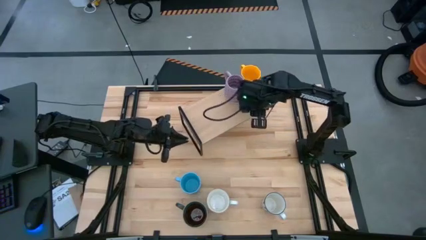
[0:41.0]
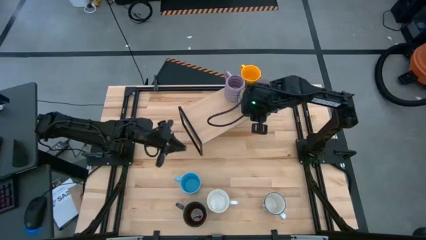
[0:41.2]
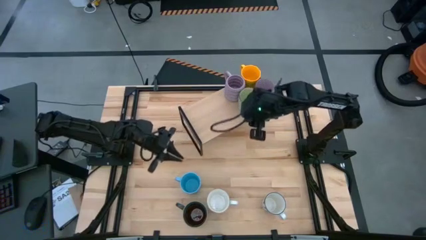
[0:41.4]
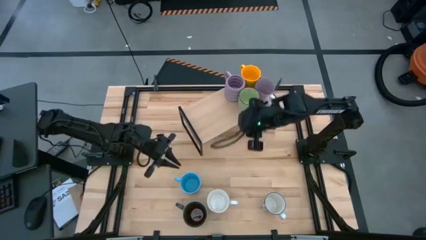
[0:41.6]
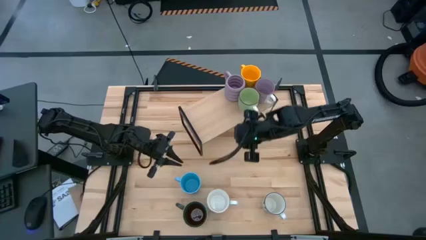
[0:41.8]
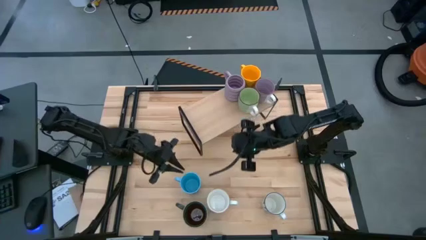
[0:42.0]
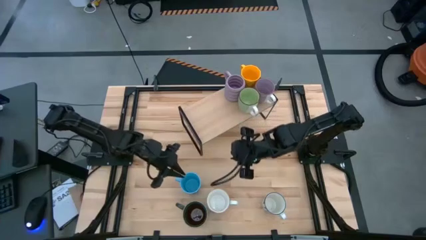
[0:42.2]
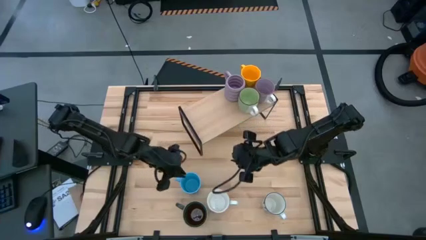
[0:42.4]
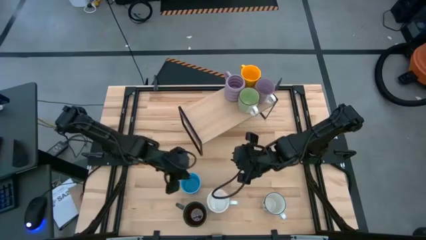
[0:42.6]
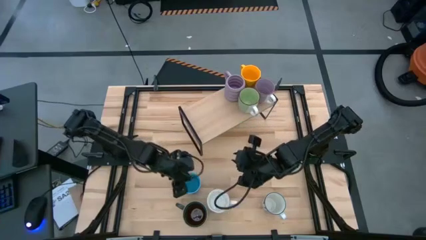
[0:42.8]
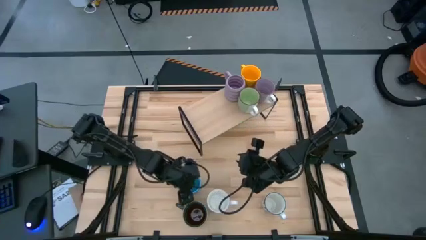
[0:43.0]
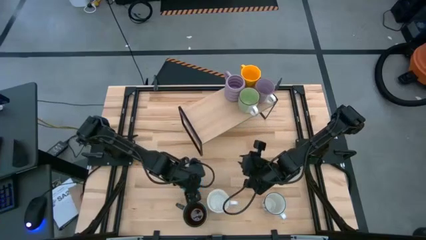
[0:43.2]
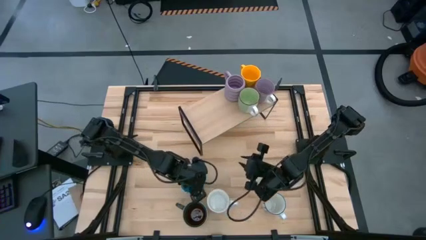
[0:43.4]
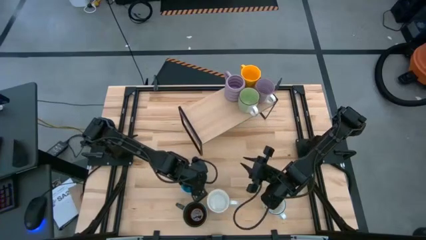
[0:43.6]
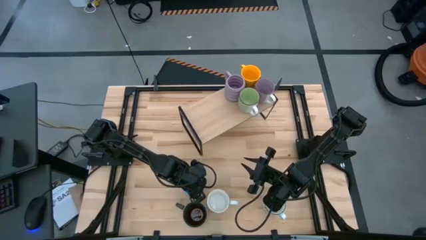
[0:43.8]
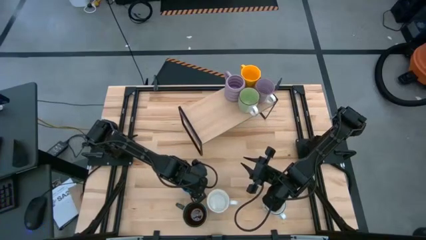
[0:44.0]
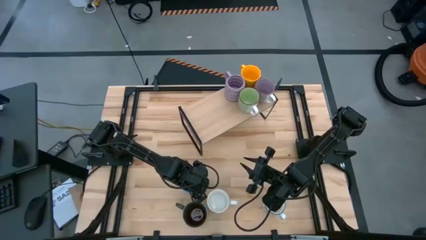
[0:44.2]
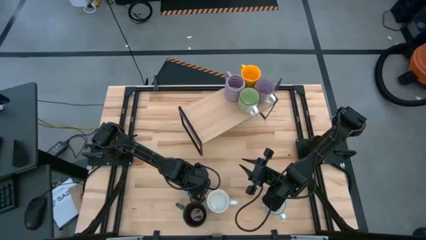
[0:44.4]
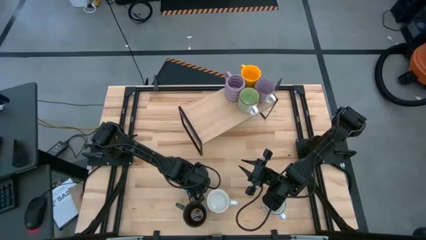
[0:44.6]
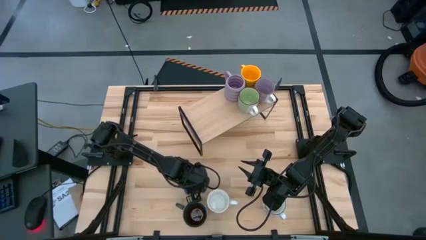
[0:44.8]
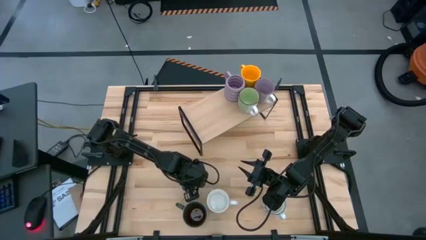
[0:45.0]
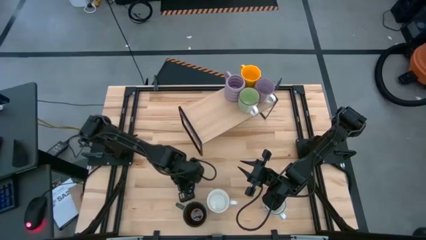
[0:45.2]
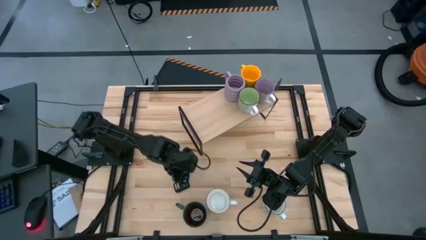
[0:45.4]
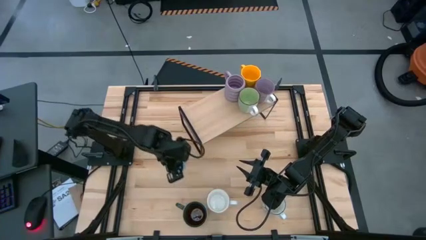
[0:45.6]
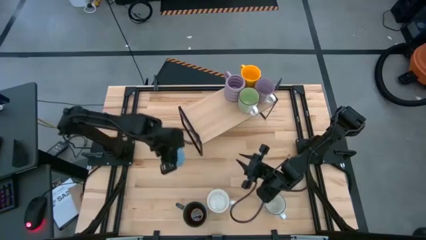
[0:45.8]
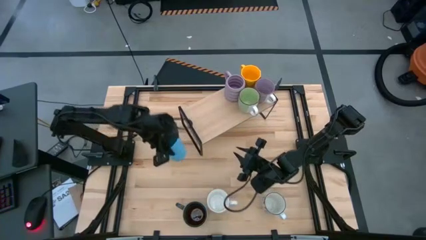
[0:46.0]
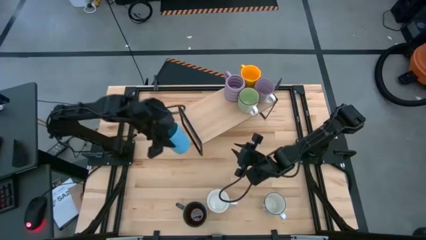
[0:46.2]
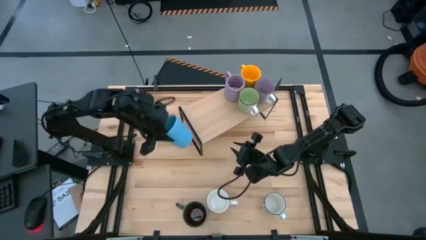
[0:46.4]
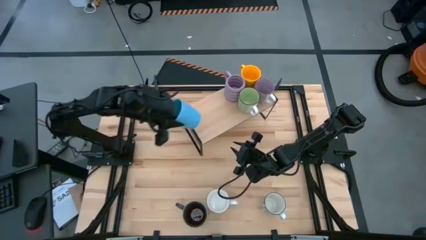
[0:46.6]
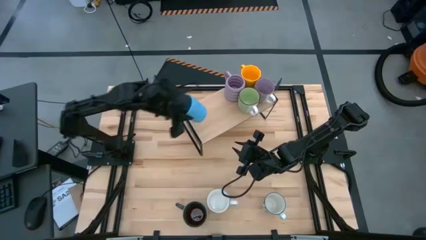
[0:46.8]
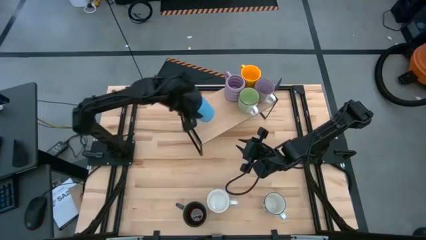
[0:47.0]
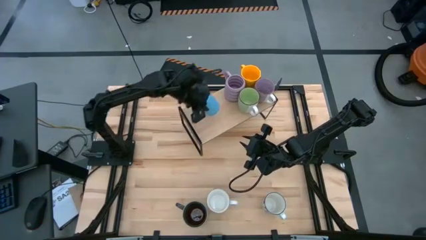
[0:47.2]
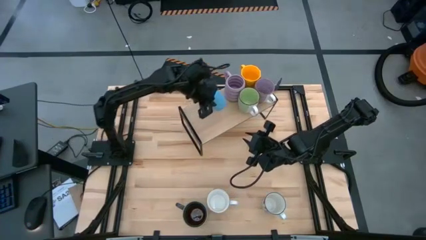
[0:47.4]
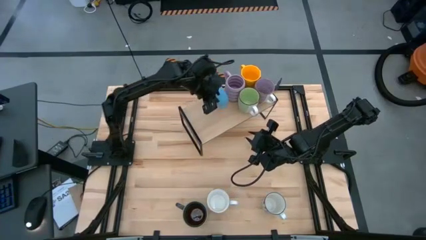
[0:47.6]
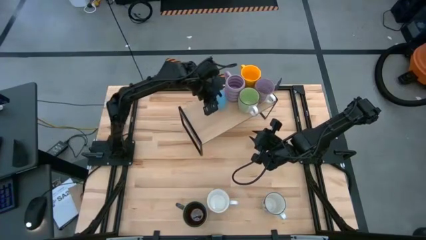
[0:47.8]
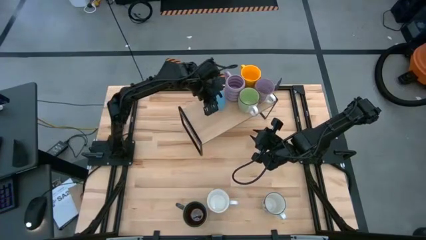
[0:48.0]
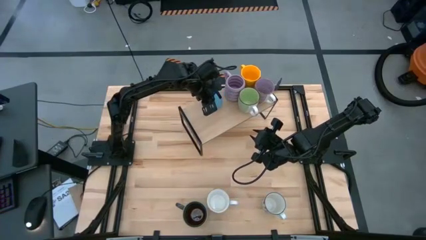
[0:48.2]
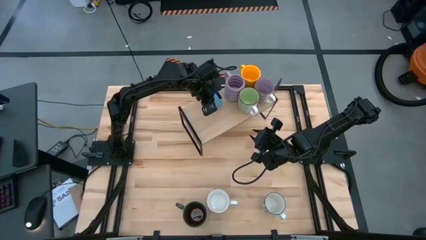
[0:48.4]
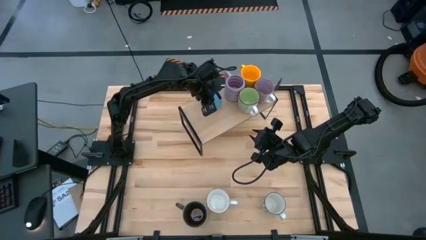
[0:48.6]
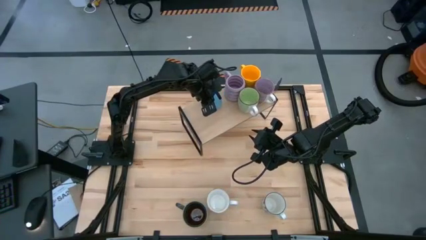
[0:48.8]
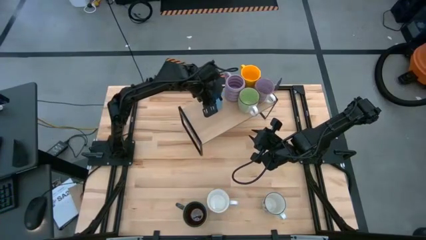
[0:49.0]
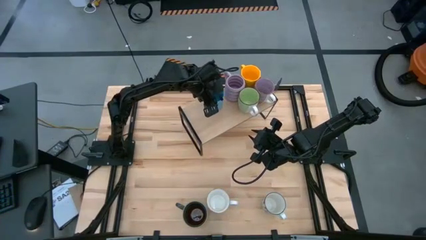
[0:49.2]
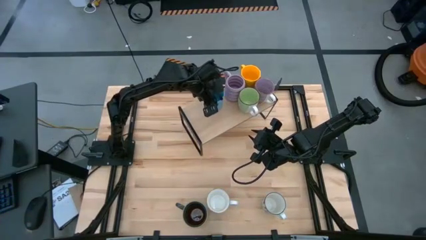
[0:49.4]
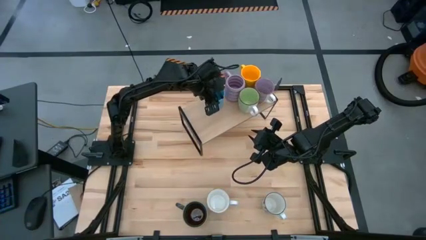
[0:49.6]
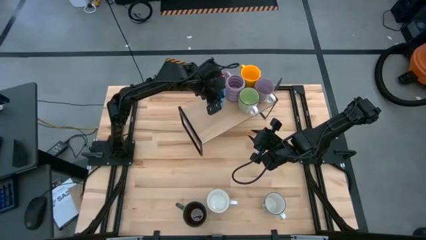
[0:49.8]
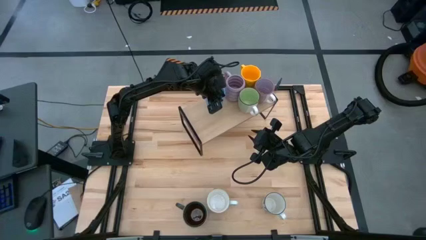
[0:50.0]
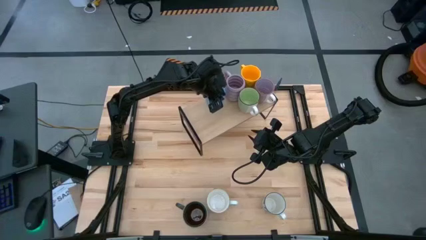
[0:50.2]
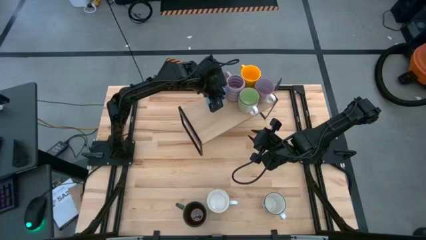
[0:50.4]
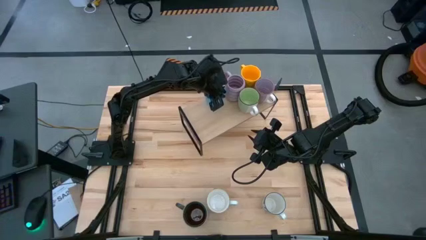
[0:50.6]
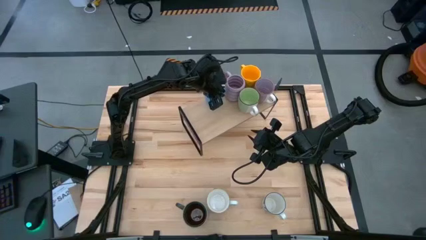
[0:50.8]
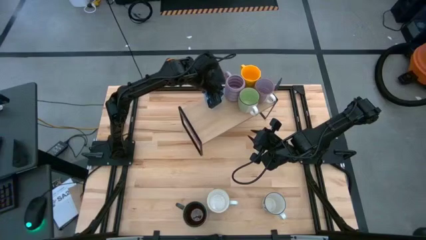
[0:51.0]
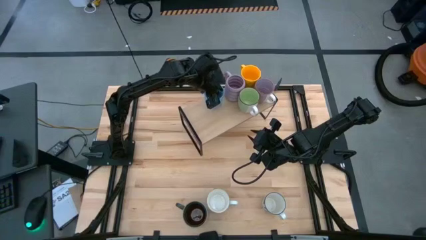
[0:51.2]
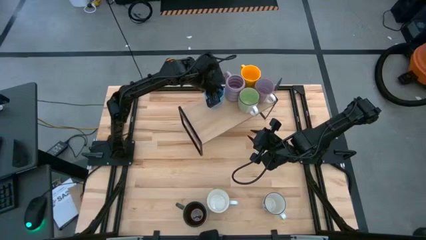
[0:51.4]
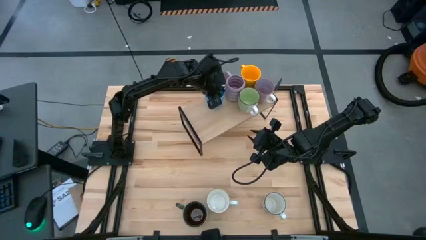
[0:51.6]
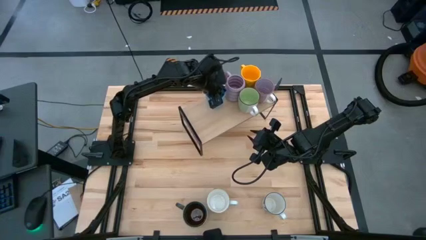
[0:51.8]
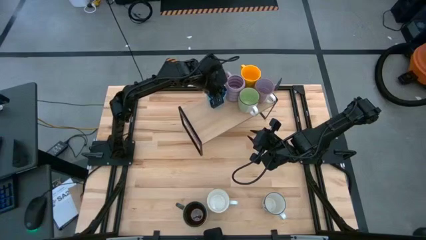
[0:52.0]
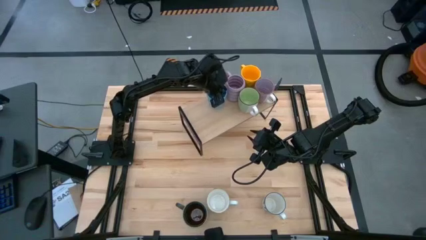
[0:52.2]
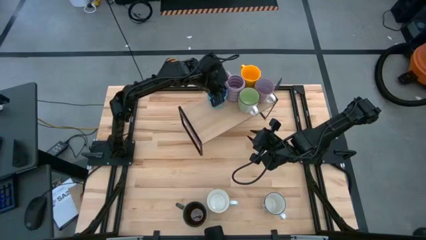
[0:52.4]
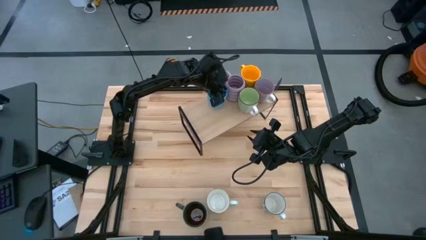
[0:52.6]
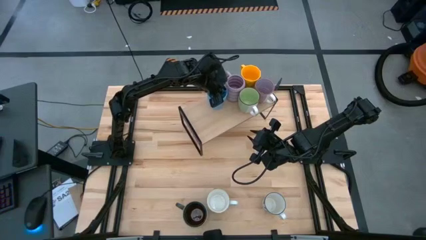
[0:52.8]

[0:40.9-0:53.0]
Task: Place coffee mugs
Put the blue mug on the shelf

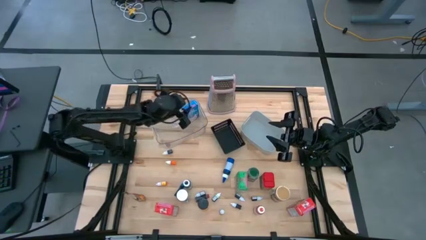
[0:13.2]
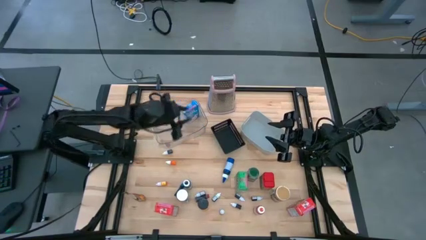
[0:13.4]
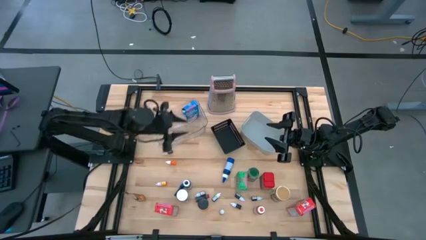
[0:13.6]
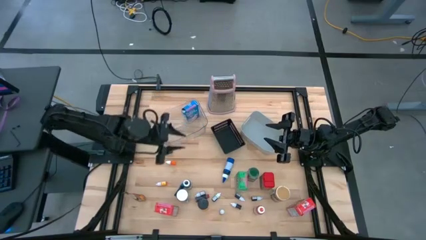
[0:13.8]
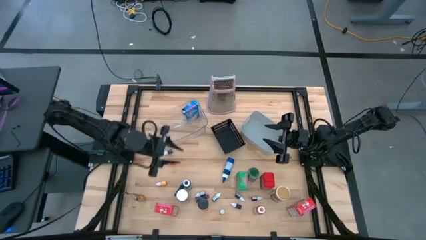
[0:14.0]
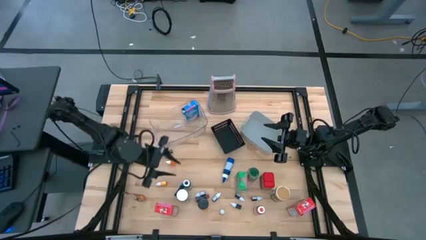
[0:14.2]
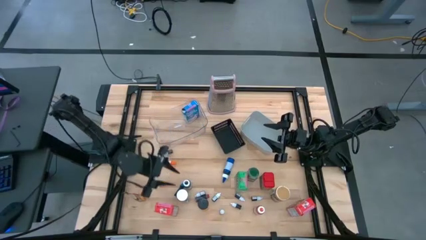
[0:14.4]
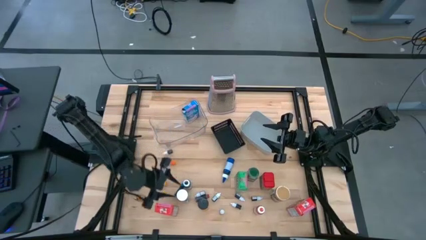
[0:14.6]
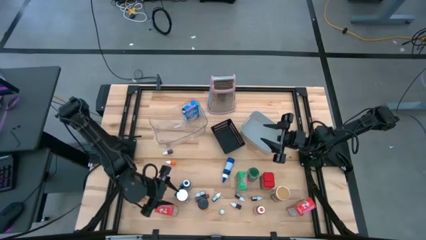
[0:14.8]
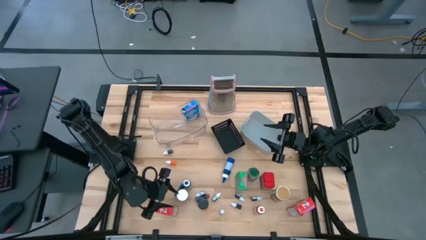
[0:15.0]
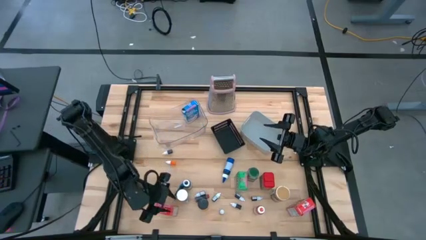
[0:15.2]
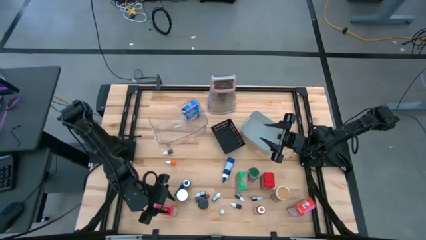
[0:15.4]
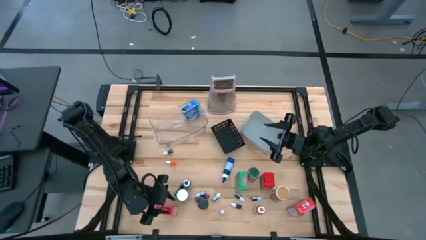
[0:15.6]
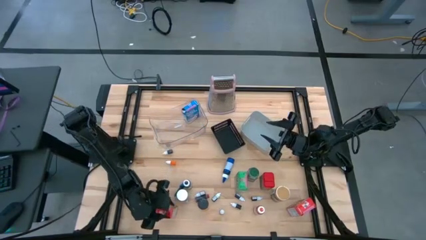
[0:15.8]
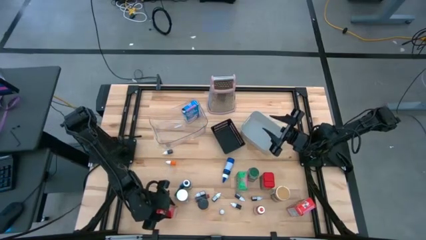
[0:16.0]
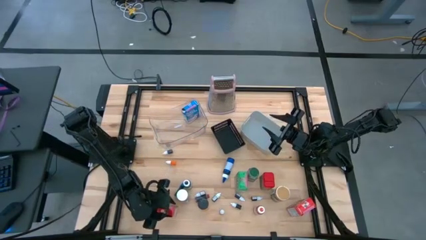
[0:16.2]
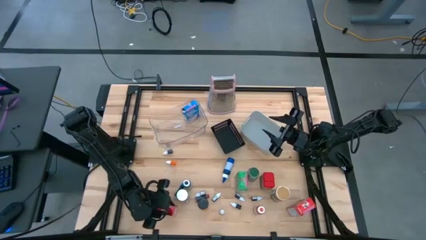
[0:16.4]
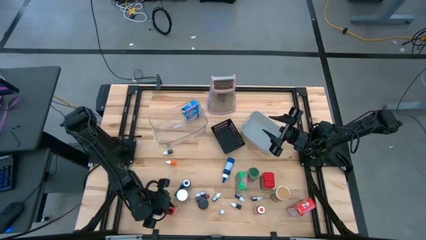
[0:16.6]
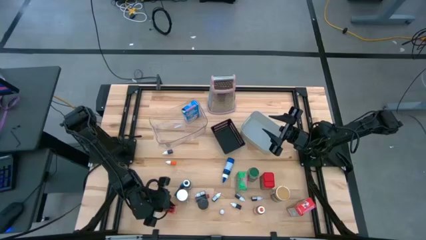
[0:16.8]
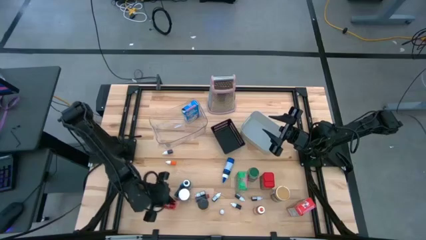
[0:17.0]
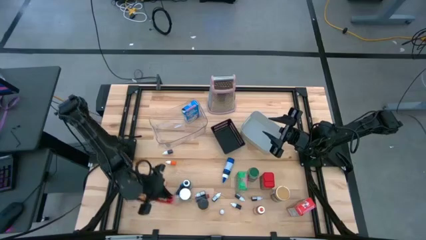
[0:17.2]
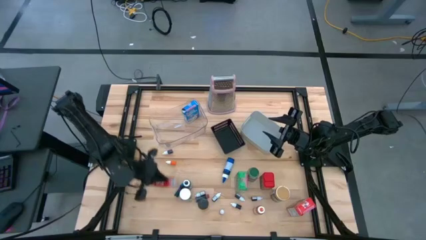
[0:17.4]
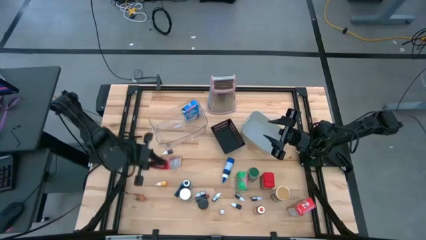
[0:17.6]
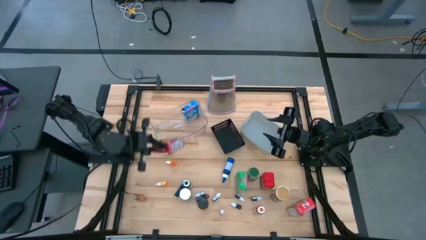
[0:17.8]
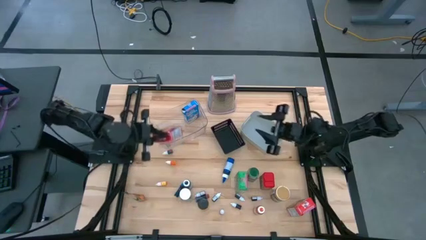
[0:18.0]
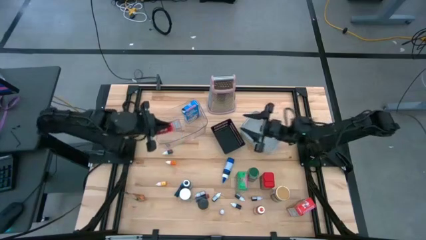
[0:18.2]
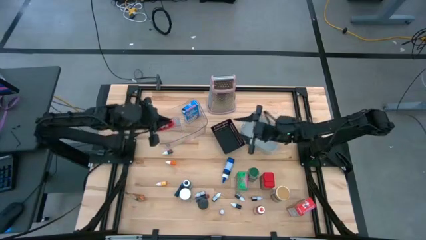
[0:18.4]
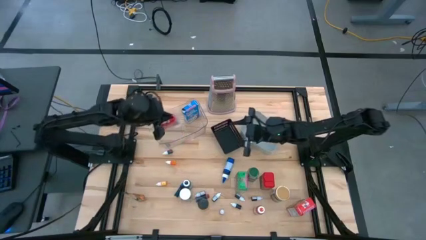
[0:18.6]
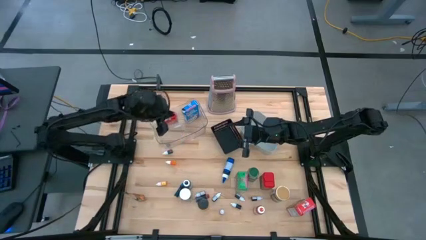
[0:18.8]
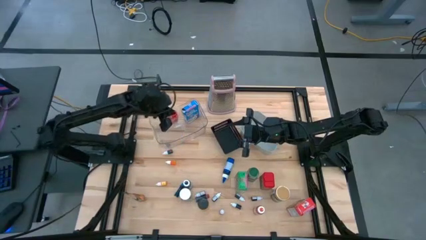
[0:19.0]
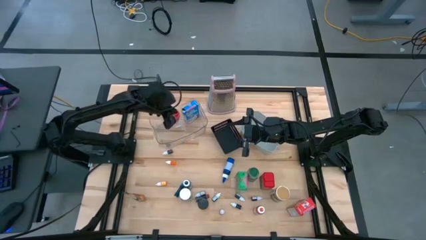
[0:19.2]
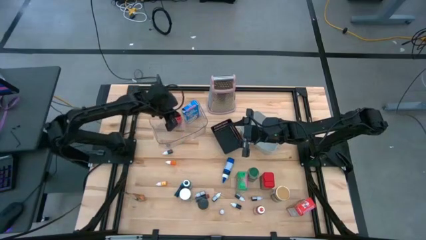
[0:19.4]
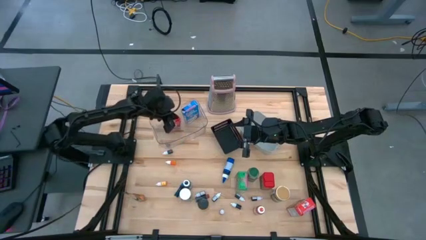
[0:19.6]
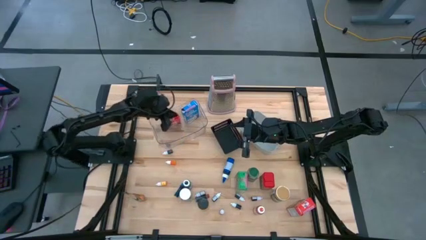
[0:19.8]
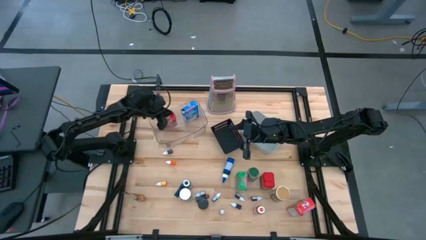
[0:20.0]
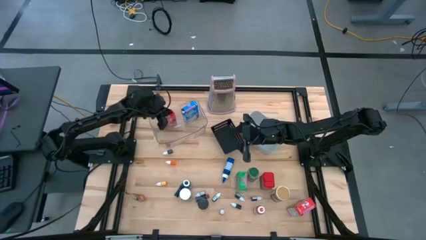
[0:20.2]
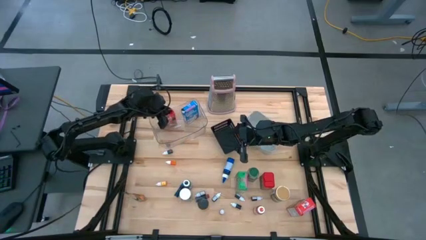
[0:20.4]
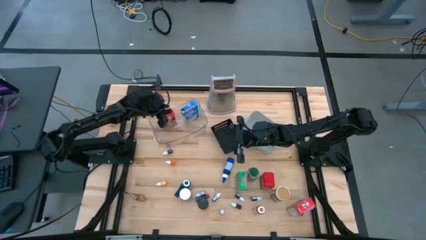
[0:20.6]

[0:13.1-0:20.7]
Task: Pick & Place Kitchen Items
Put the red cereal box into the transparent bin
